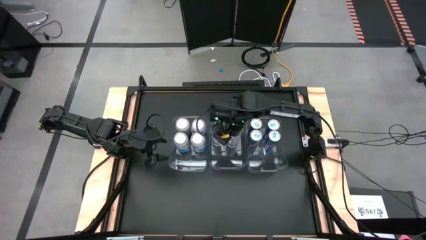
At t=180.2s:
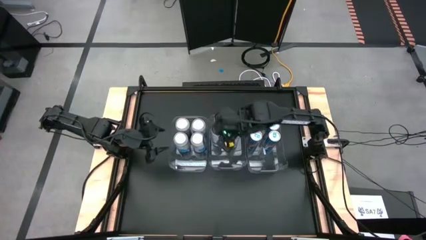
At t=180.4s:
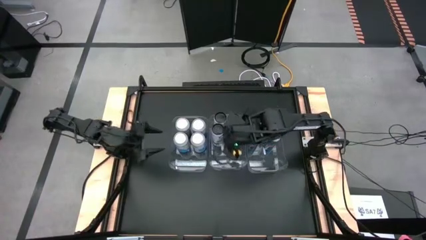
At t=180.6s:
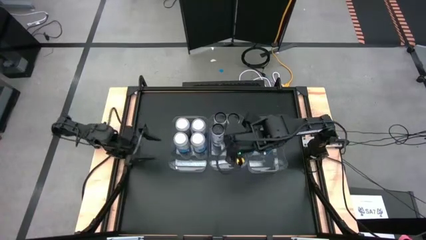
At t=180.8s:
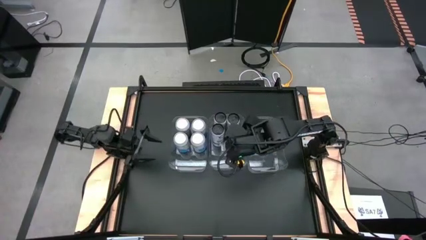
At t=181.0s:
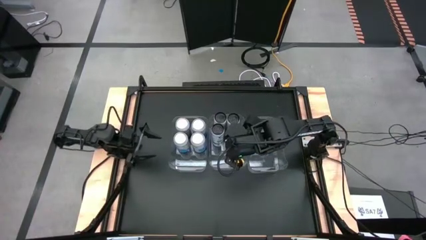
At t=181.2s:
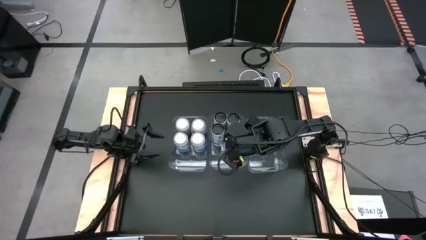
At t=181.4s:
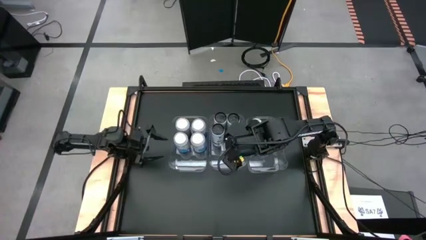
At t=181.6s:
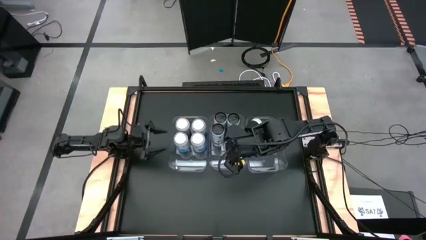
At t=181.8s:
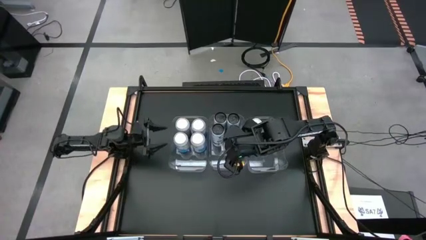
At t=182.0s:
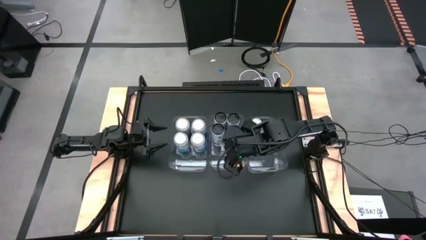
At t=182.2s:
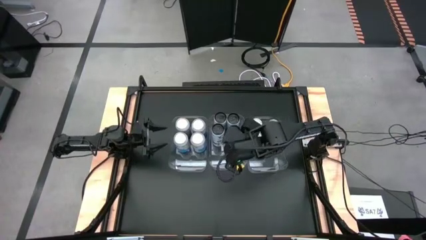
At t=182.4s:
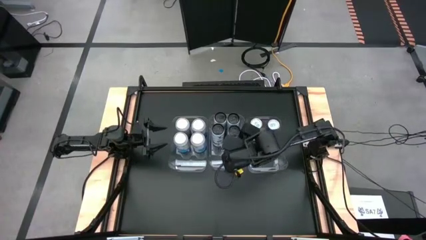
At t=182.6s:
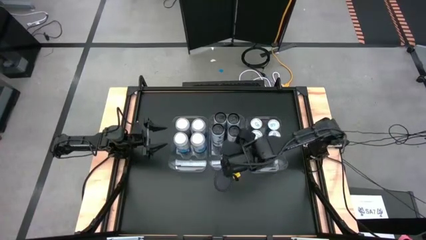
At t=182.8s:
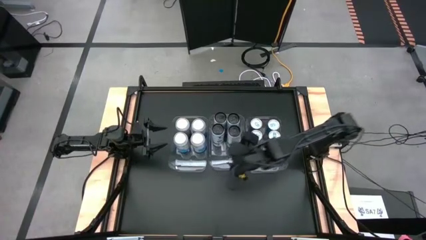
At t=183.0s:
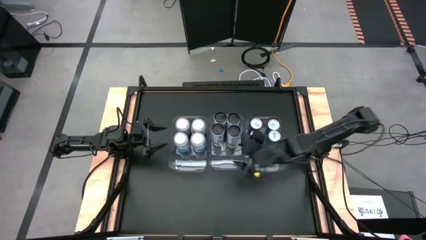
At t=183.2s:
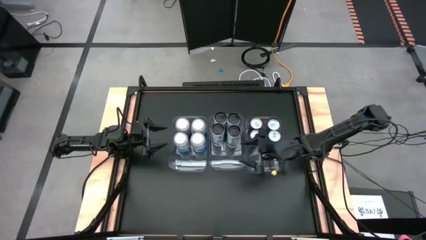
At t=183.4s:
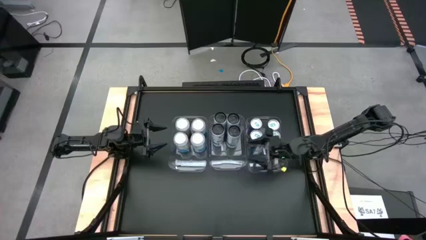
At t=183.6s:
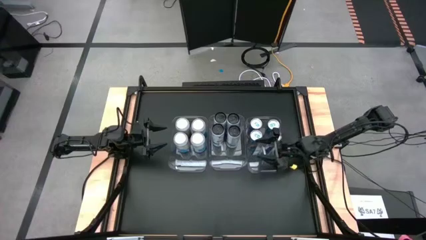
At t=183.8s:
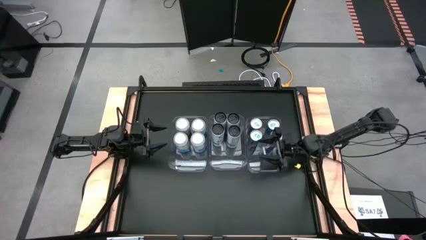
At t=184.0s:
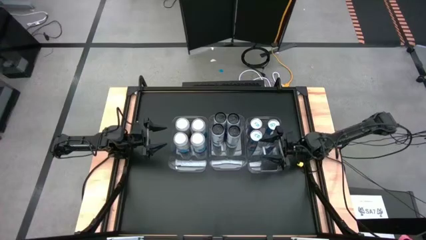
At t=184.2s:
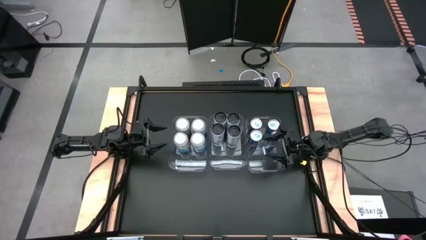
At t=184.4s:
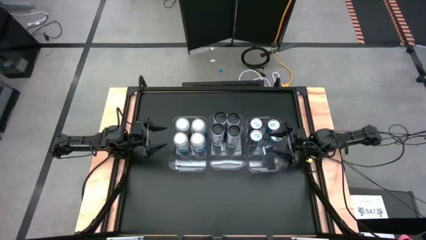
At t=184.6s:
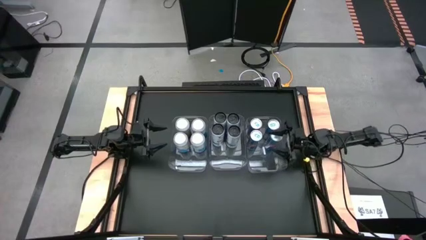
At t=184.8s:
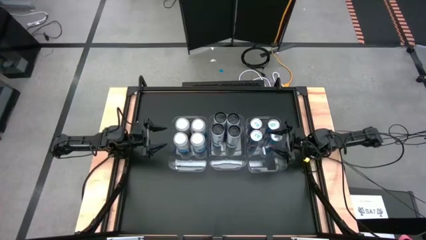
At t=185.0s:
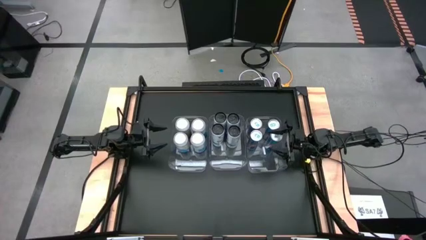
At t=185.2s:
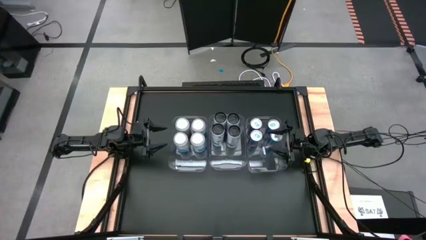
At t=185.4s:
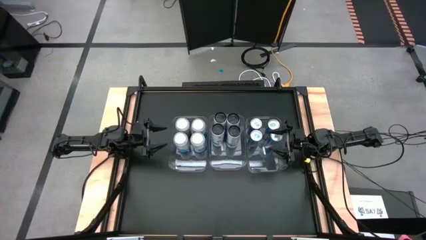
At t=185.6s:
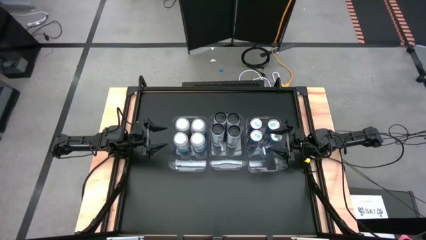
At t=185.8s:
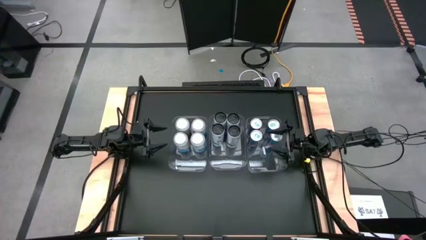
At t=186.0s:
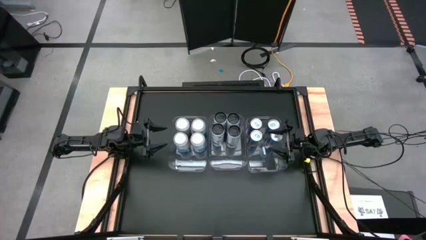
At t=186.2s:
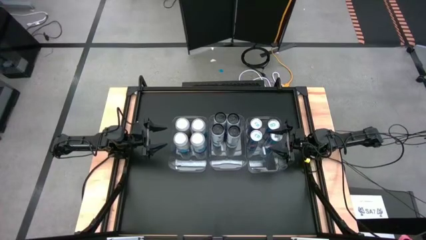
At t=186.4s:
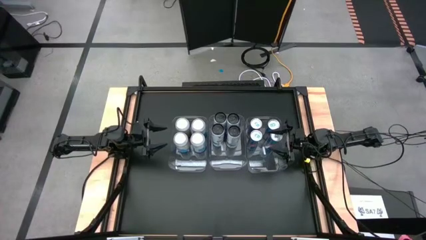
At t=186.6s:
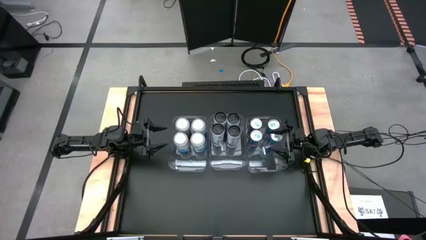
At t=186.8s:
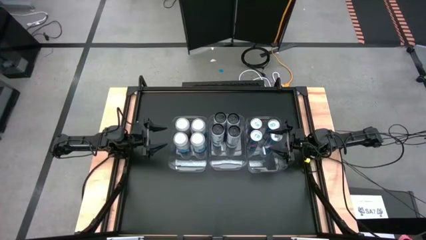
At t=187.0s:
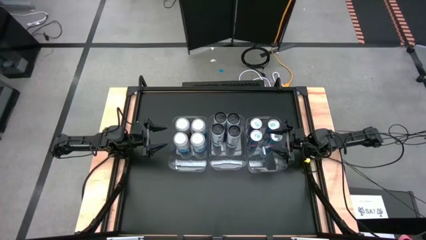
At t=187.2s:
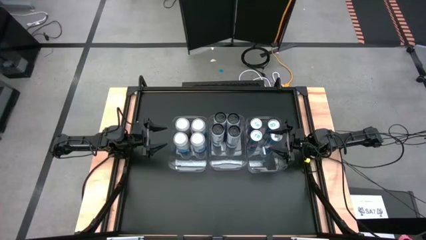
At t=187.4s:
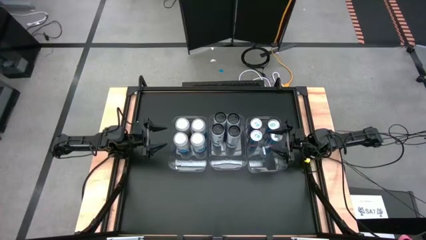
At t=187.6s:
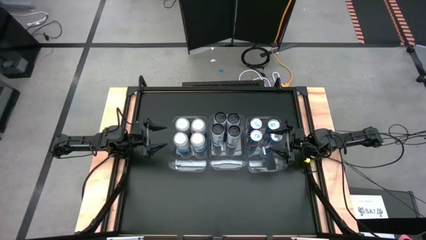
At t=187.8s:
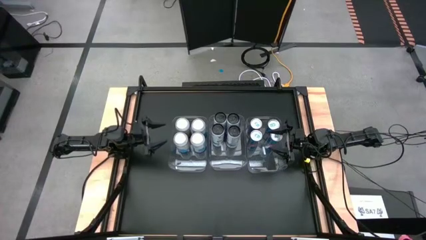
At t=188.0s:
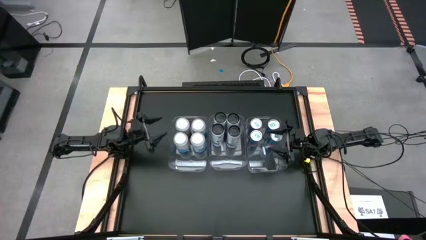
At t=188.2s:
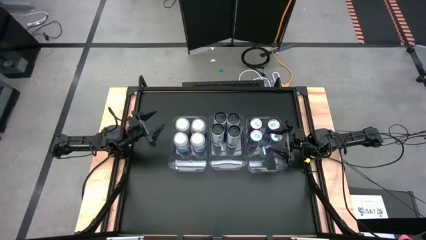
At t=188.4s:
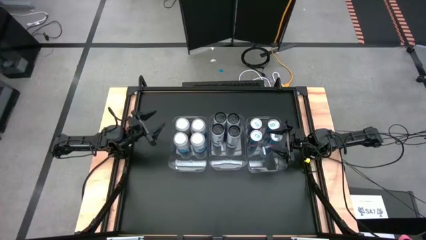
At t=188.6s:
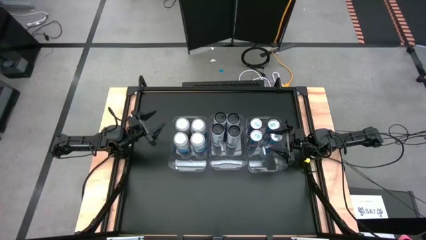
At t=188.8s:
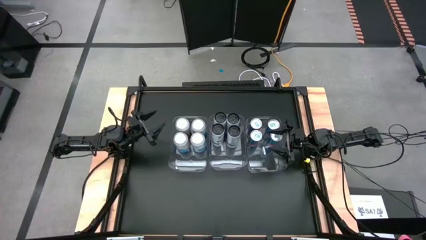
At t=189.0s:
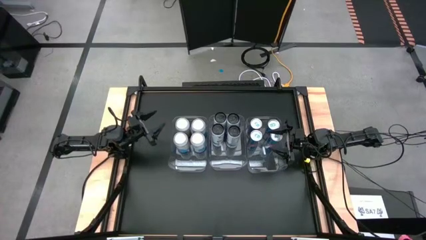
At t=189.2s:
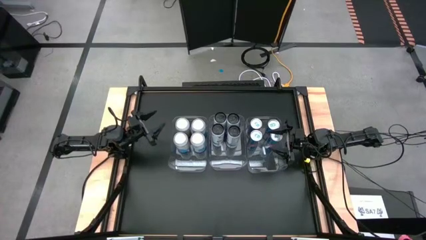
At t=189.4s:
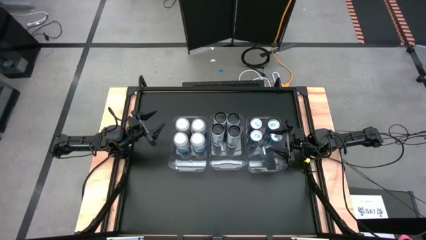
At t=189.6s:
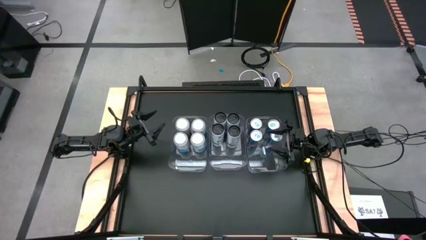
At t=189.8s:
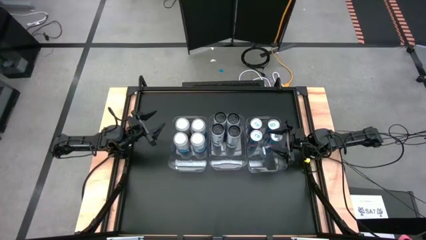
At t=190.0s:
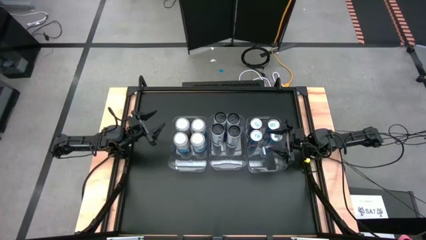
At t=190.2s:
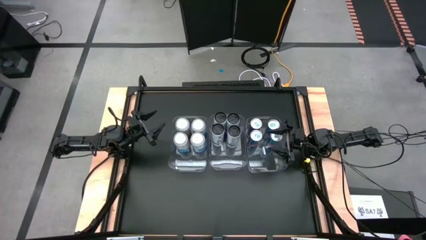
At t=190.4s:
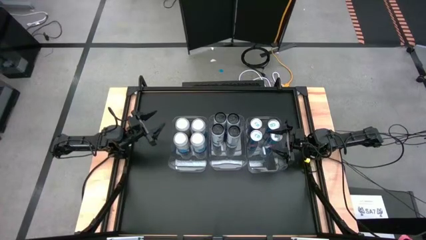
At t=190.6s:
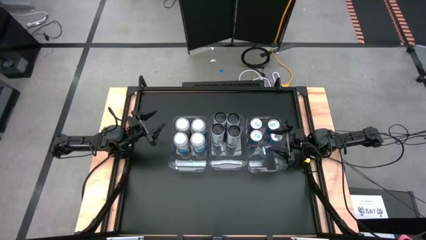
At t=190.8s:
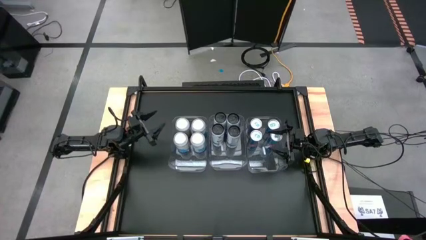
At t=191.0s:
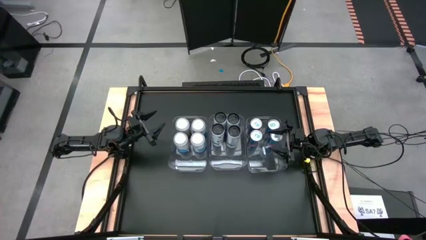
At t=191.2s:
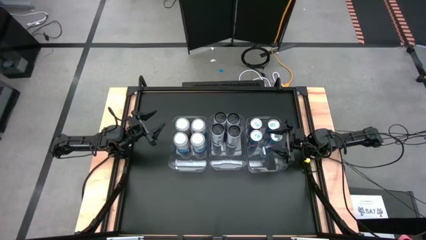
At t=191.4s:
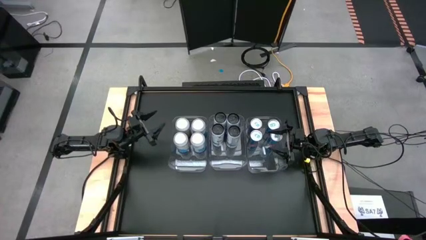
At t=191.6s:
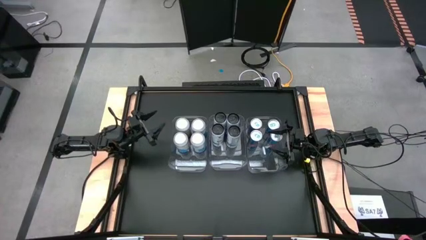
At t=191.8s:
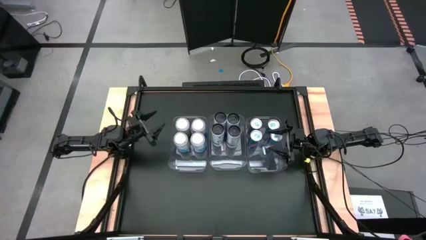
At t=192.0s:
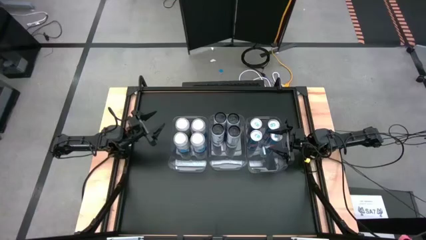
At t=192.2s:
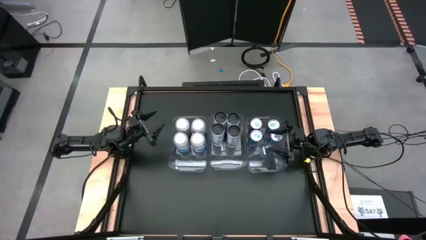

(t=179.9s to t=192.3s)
Task: Sort soda cans
Return to Home Position

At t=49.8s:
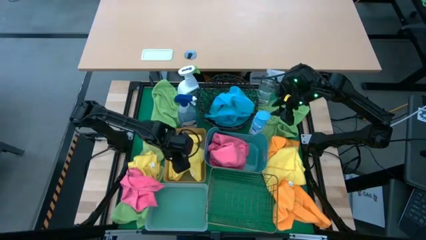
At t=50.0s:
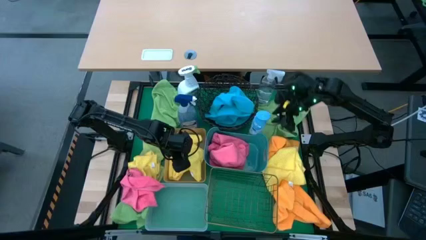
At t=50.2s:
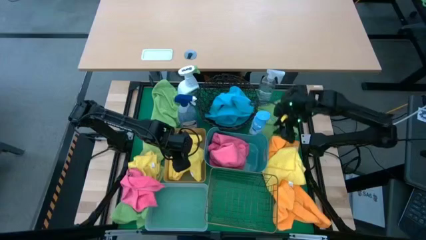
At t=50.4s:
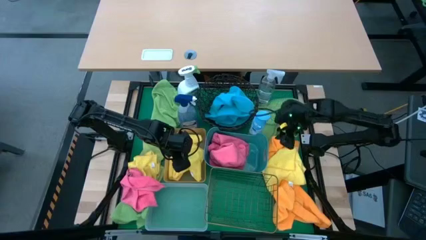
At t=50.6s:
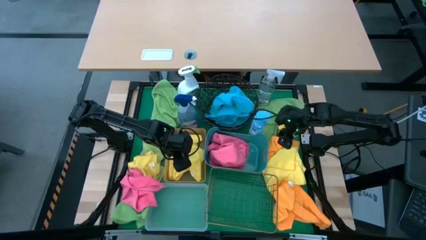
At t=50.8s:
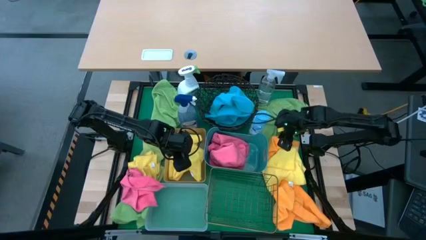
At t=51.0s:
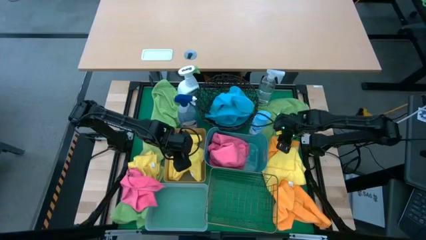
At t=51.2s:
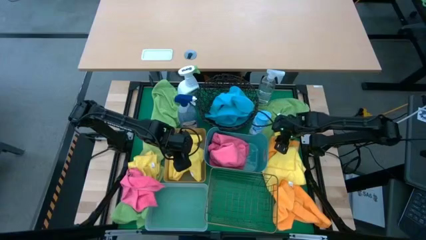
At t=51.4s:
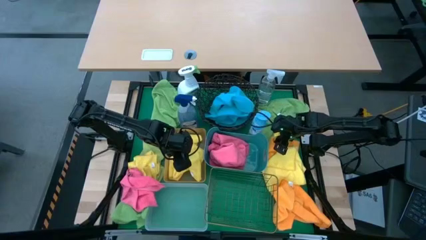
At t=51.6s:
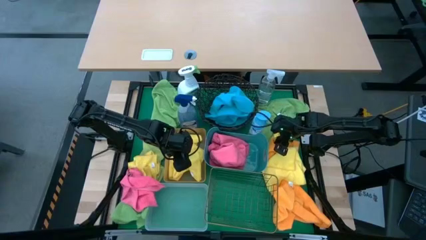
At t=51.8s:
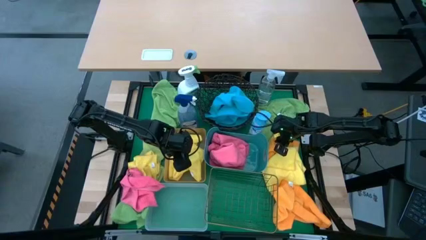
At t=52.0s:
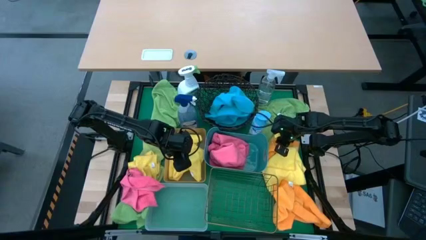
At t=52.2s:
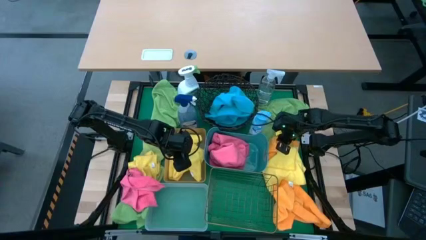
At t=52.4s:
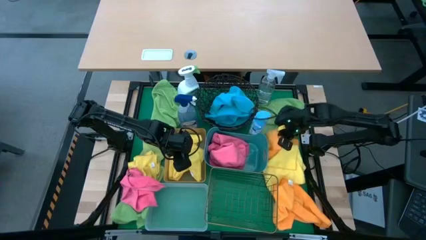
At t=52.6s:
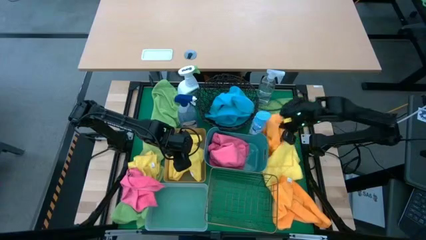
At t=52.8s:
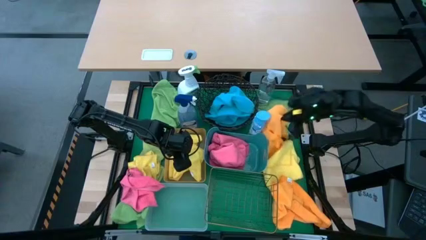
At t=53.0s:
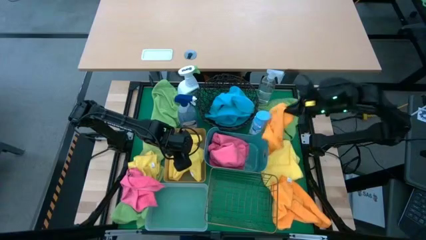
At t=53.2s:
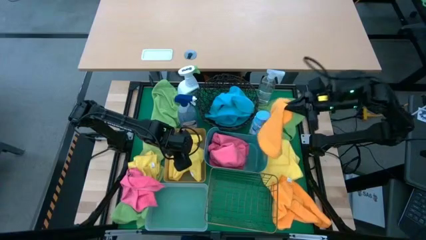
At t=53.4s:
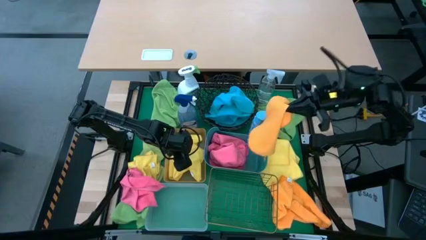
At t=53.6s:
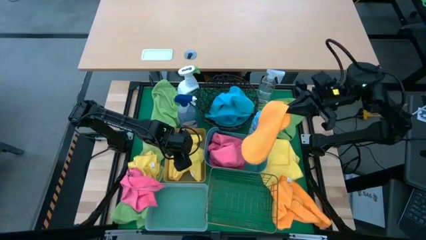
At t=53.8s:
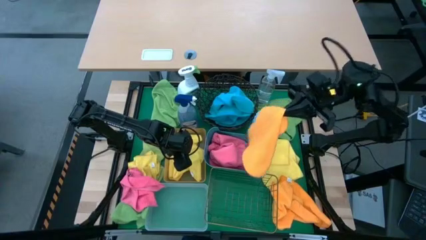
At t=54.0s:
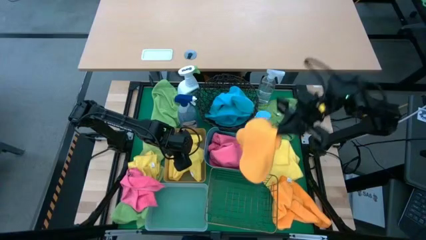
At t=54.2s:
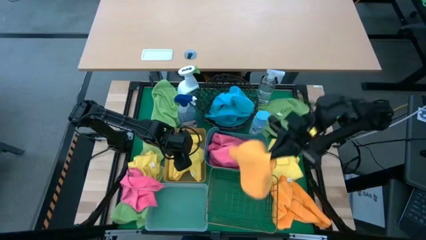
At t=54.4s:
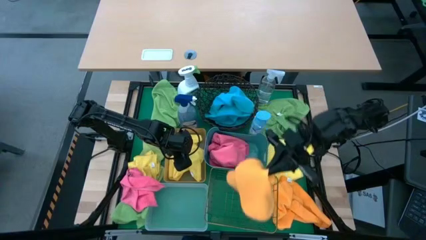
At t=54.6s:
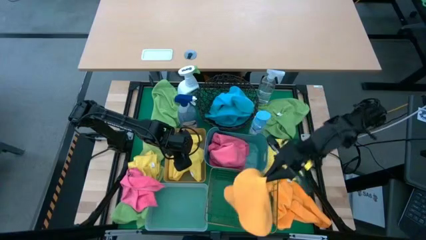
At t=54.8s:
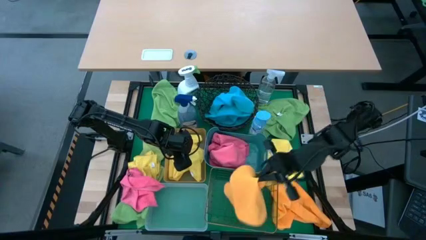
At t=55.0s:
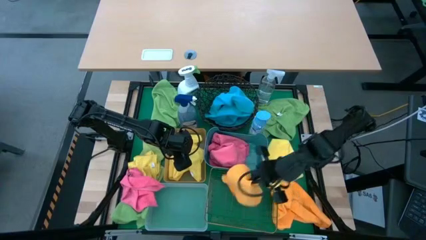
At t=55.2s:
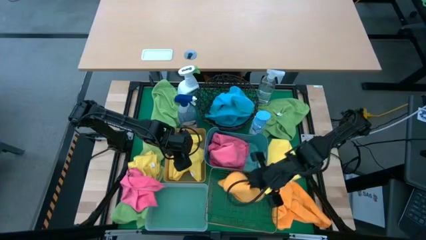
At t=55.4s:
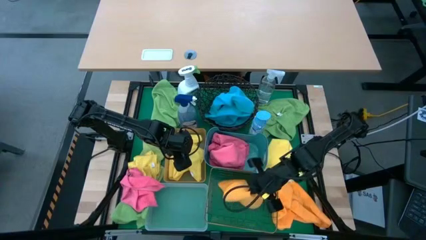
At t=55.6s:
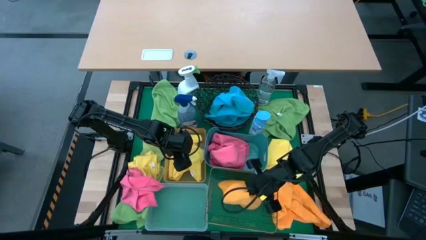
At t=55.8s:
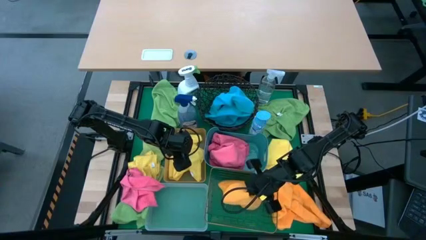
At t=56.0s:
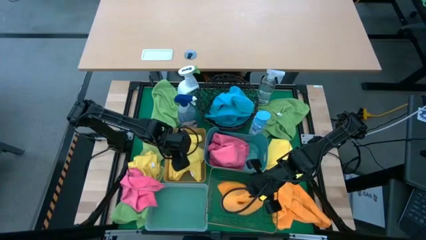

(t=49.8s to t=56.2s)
Task: Sort microfiber towel by color & place in baskets
Put the top orange towel into the gold rectangular wire basket
